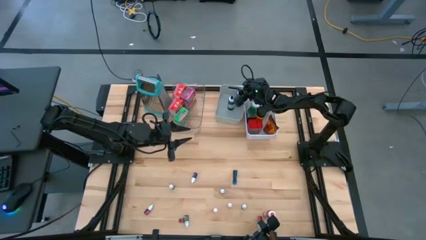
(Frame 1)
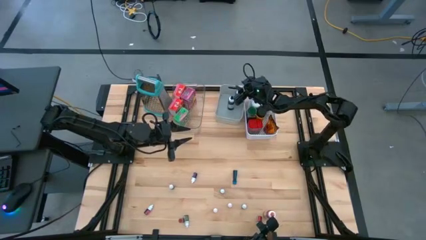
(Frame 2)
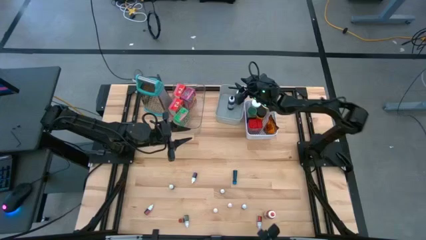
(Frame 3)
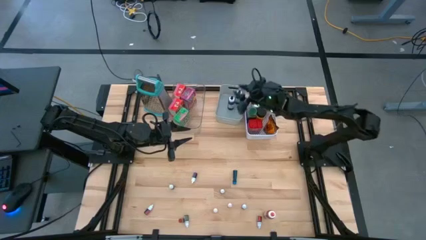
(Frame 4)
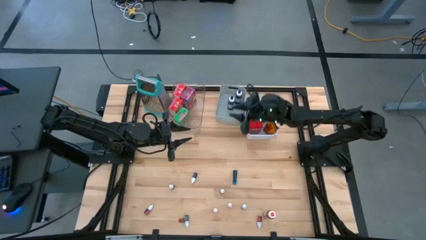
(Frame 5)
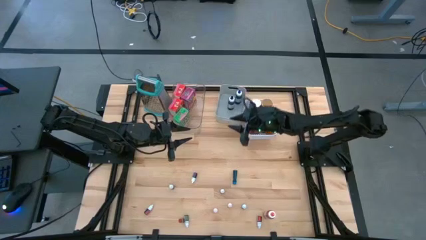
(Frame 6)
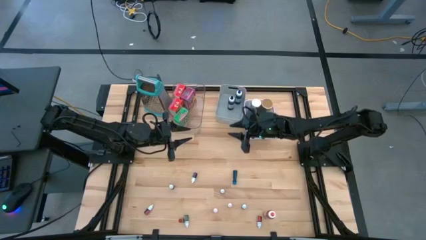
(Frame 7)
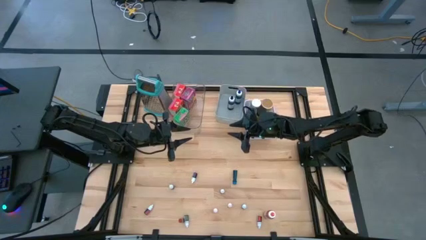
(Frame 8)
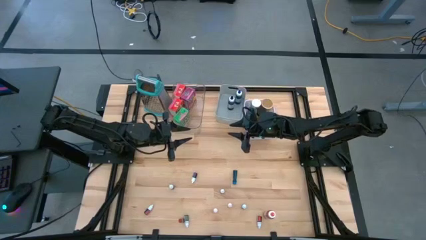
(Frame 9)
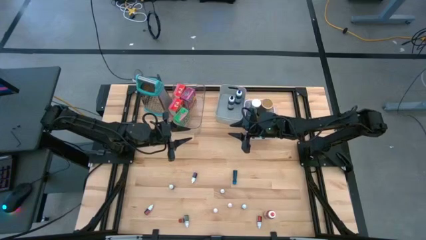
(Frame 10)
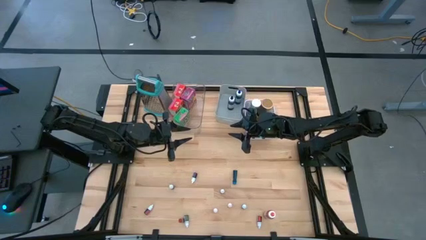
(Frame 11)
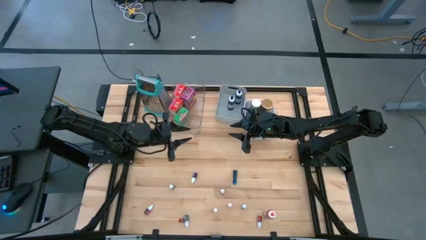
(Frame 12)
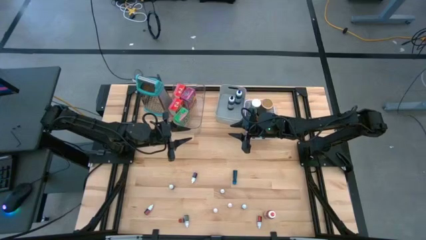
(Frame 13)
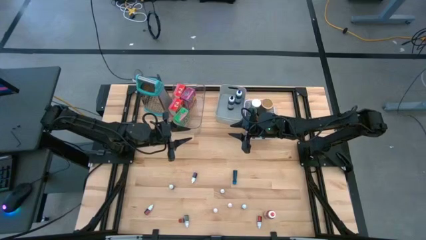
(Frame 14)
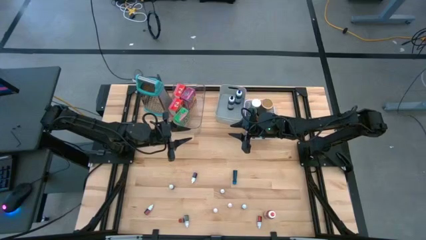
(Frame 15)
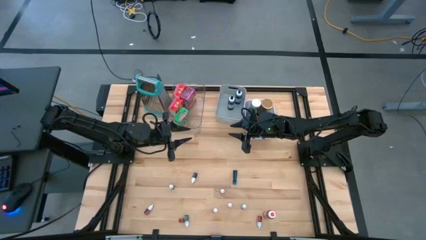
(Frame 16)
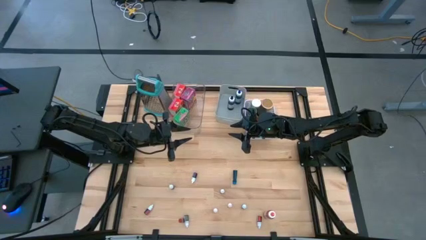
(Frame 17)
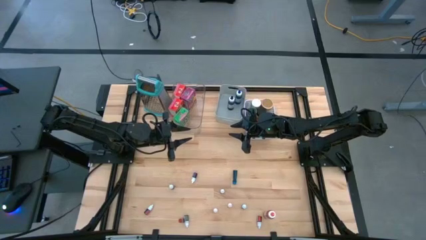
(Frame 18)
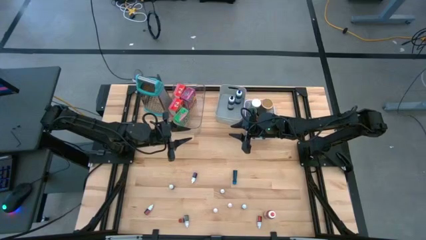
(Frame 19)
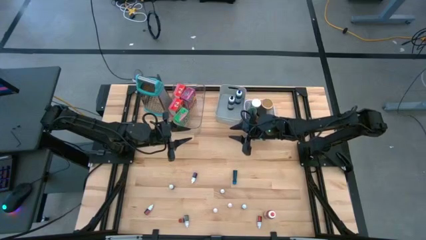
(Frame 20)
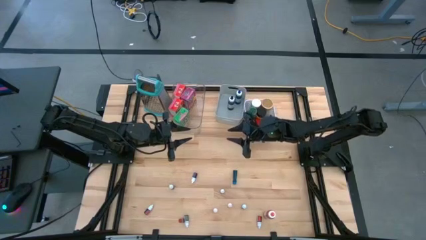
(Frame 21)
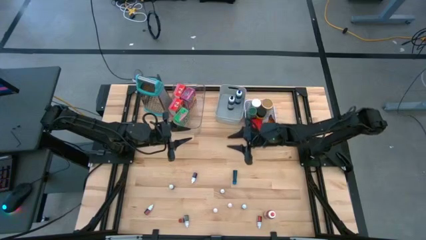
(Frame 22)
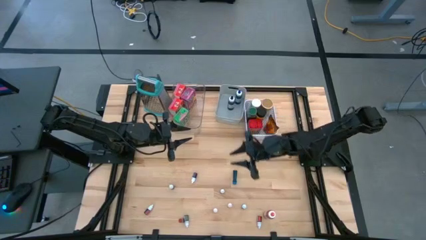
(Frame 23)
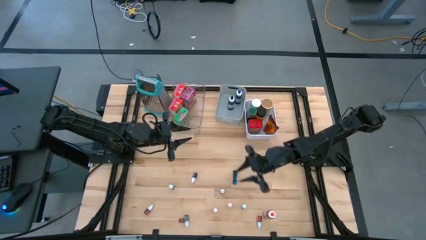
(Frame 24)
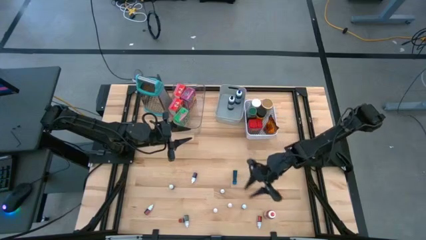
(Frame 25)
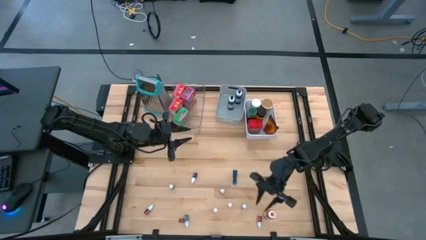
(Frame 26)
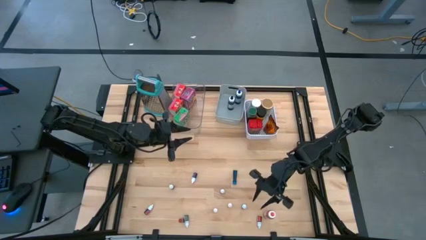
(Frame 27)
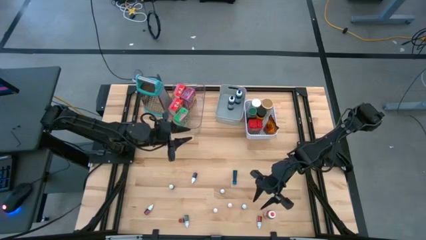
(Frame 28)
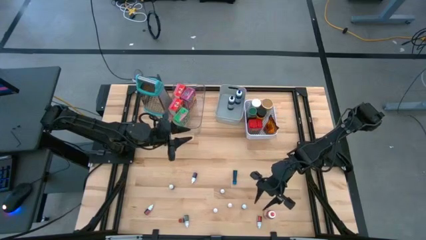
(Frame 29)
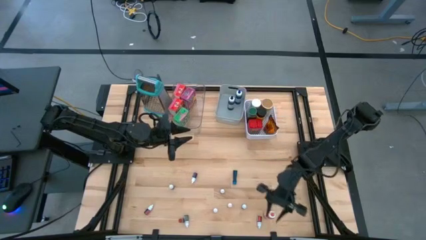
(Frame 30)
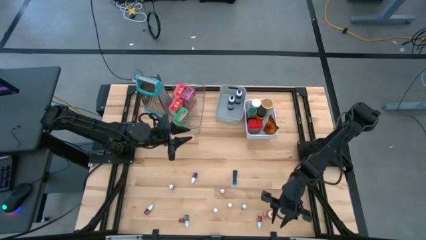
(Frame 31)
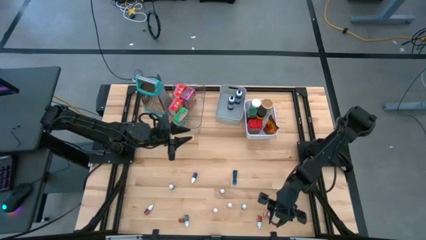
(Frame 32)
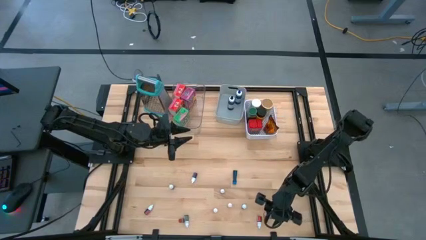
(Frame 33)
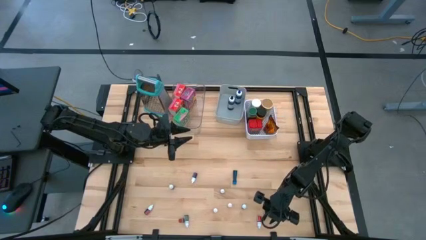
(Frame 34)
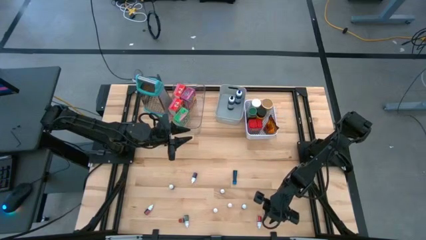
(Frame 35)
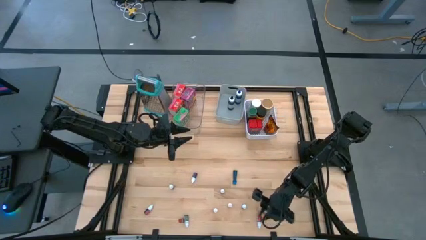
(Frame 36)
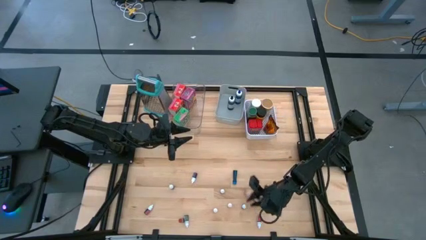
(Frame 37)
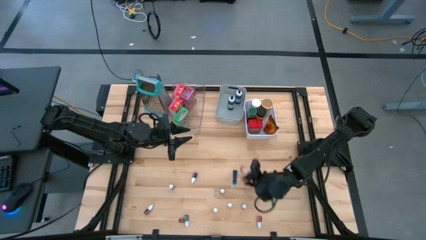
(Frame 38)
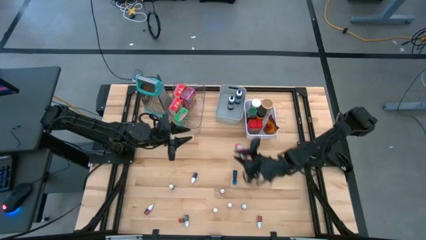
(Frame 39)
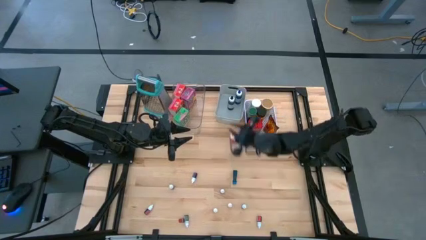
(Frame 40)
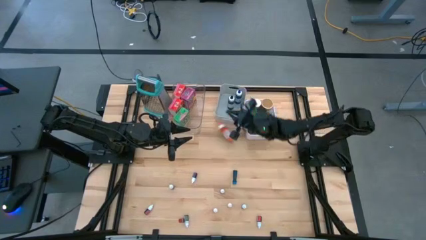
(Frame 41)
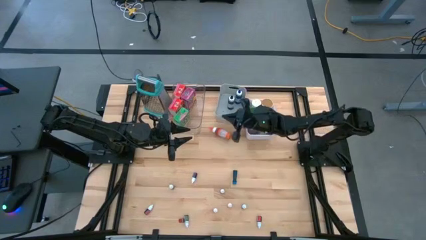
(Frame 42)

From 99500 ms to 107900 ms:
Task: Pick & Place Kitchen Items
Put the large orange food coloring bottle into the gray bin

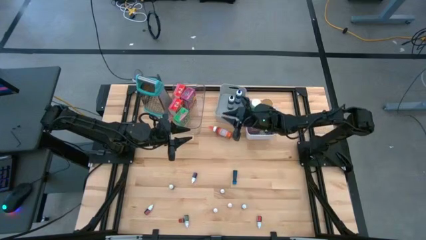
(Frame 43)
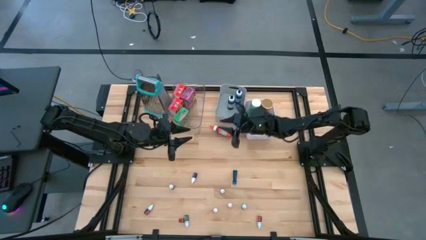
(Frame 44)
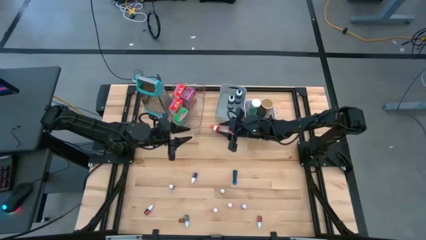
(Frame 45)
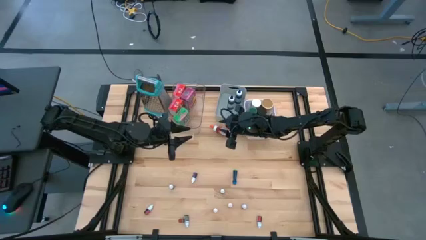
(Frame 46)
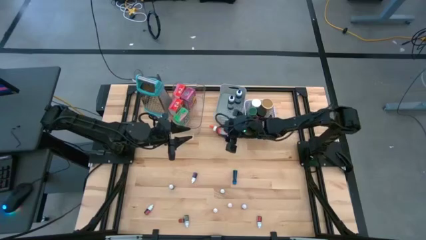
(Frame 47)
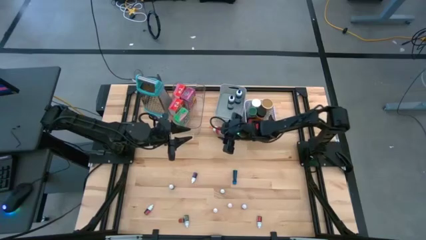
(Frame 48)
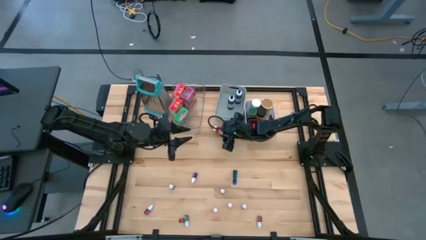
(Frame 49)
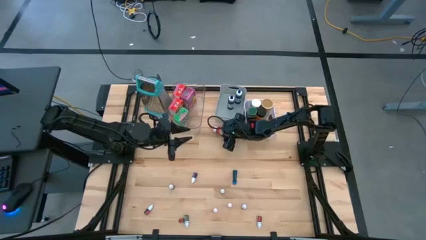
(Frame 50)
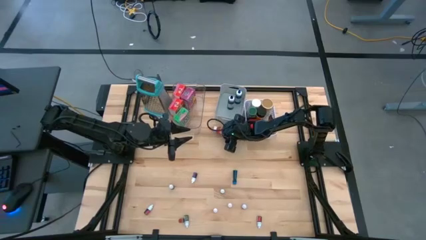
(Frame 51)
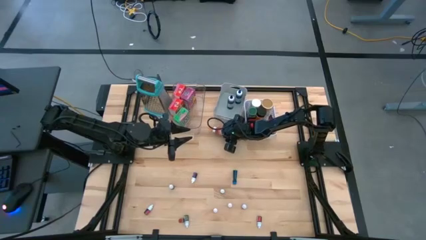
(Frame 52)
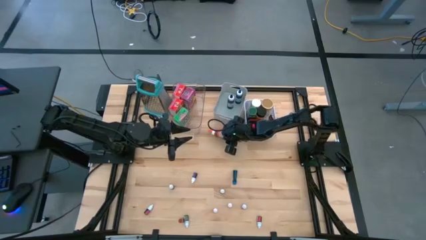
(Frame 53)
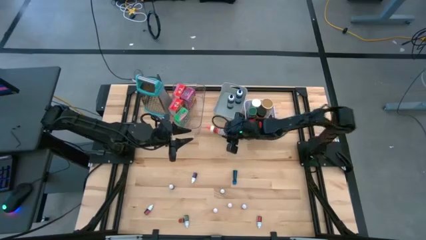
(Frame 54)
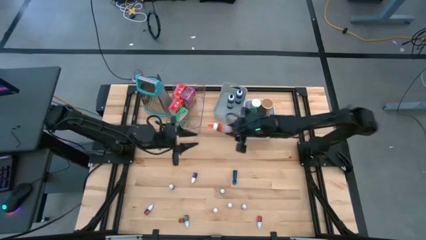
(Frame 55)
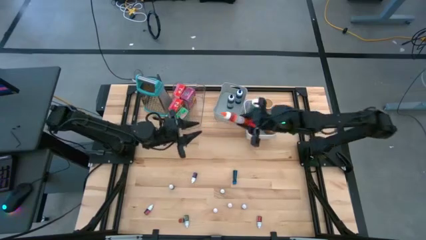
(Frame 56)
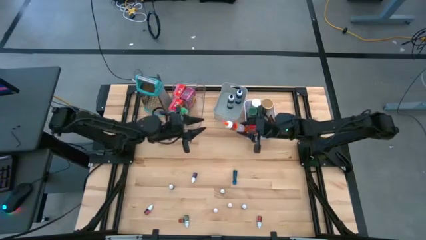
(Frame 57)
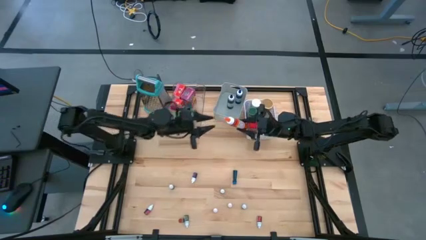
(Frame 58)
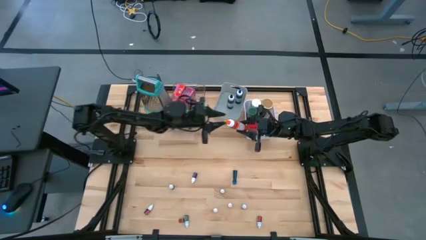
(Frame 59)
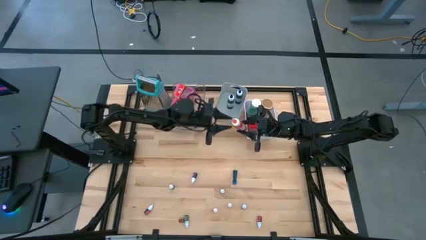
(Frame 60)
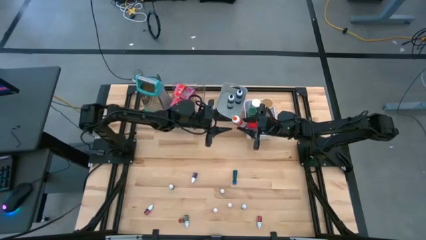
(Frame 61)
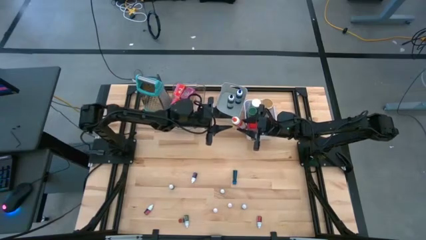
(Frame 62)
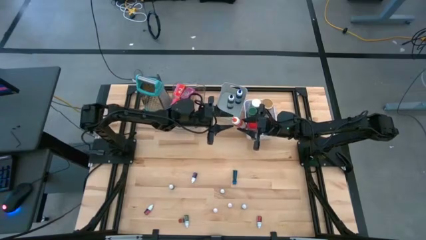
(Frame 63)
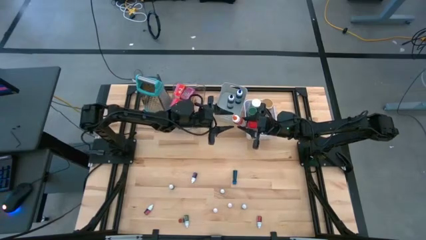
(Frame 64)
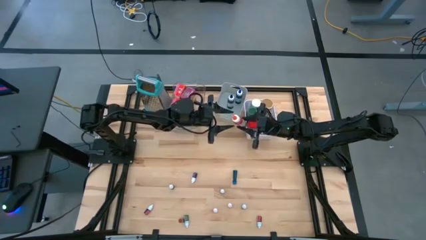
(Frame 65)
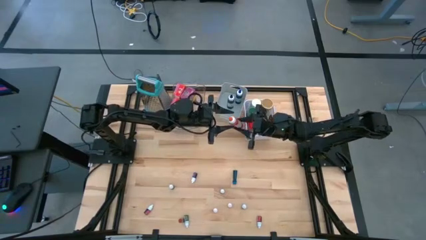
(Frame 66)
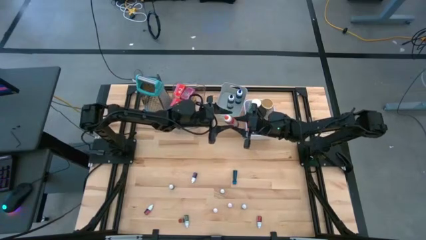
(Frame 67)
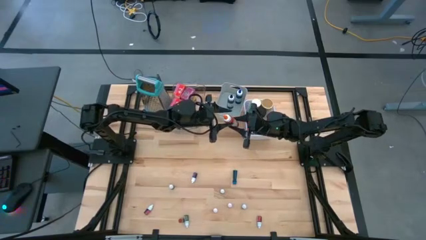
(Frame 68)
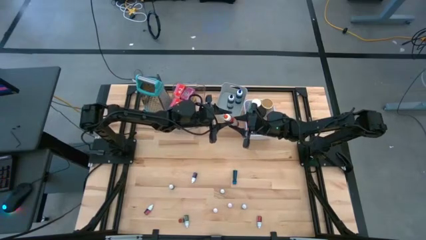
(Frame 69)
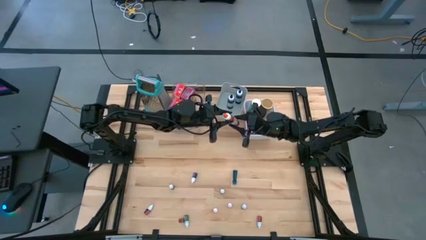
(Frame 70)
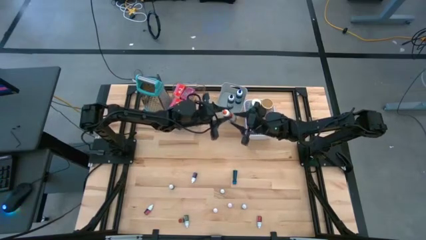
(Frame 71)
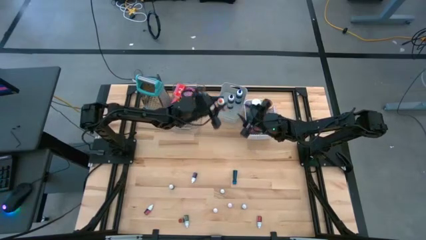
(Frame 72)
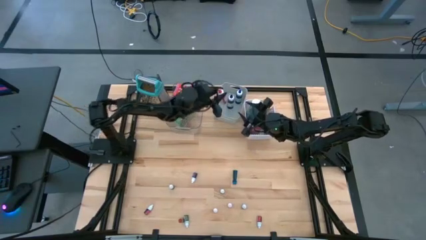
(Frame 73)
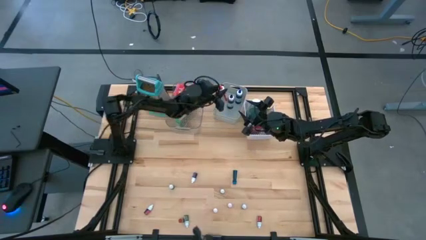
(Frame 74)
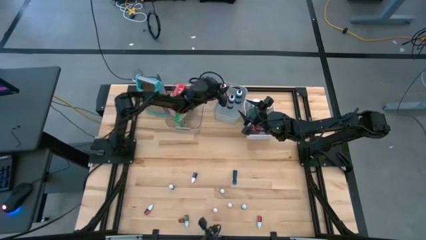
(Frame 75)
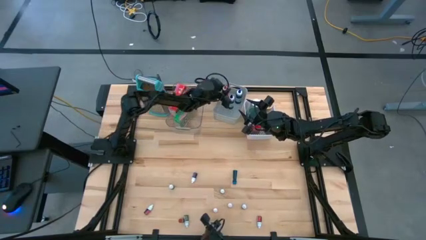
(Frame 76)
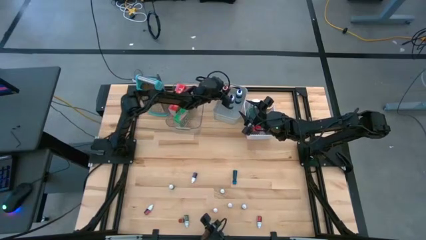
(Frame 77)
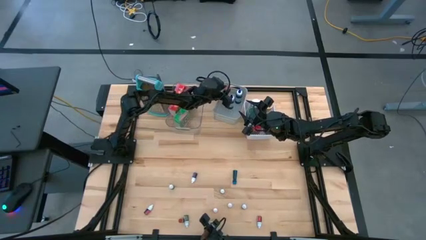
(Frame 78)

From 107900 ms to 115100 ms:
Put the large orange food coloring bottle into the gray bin
